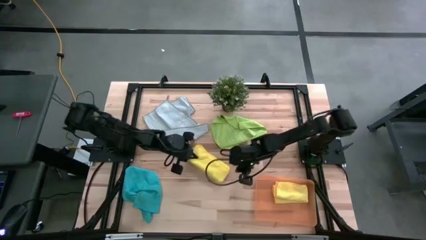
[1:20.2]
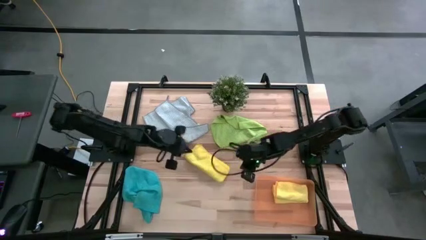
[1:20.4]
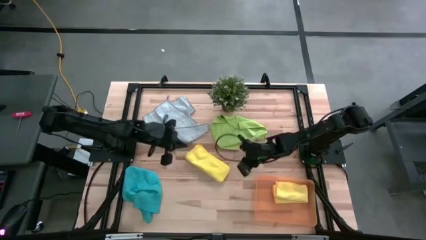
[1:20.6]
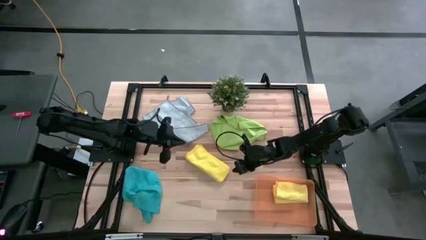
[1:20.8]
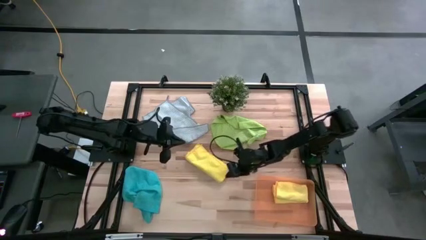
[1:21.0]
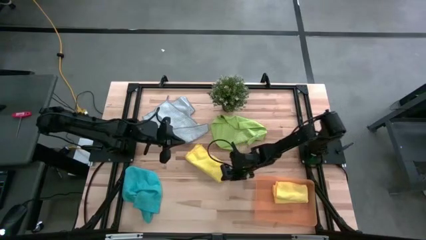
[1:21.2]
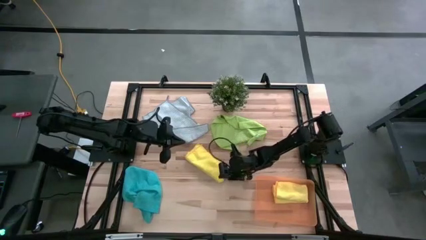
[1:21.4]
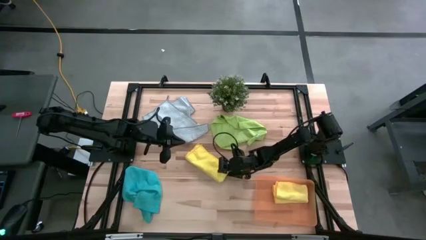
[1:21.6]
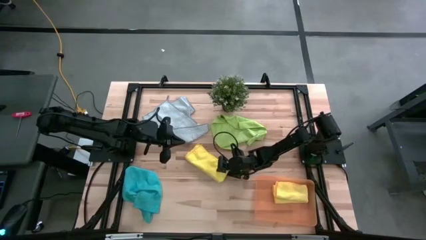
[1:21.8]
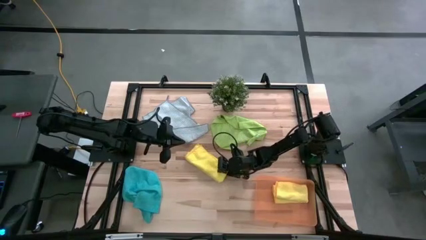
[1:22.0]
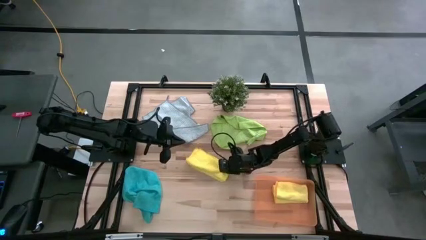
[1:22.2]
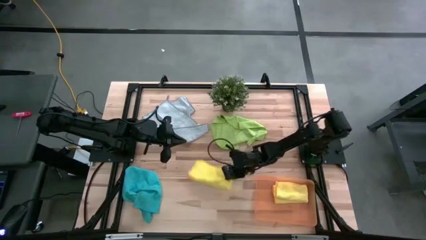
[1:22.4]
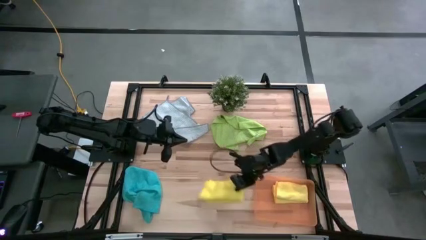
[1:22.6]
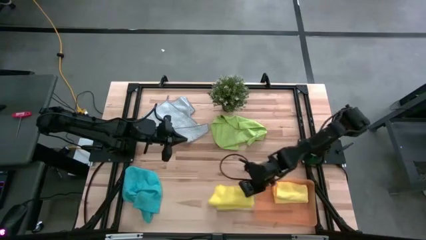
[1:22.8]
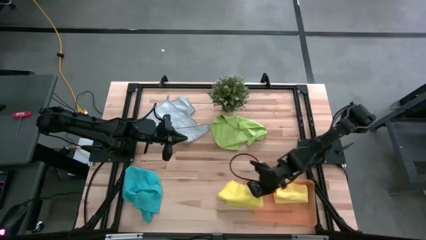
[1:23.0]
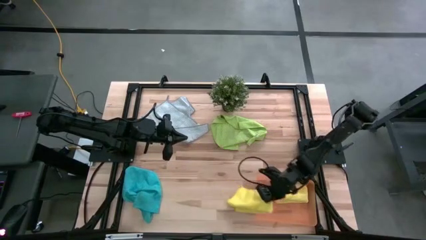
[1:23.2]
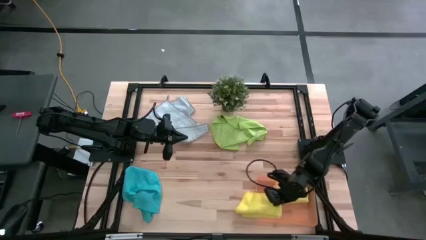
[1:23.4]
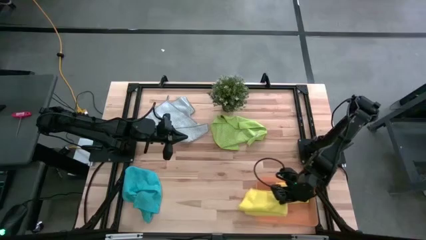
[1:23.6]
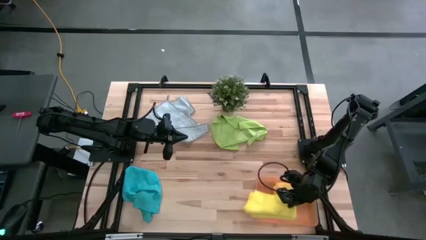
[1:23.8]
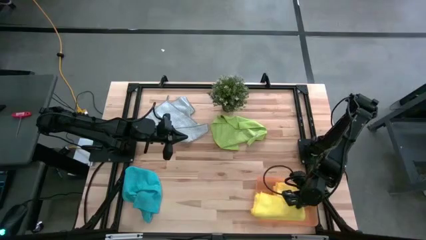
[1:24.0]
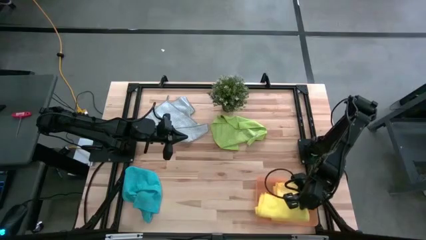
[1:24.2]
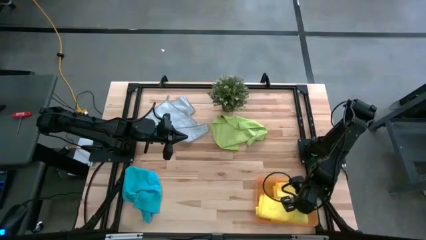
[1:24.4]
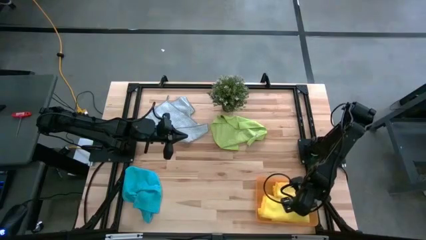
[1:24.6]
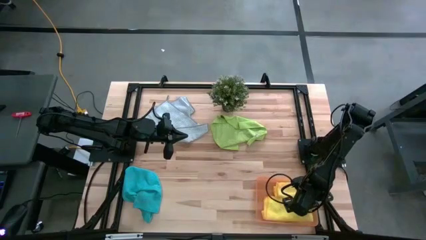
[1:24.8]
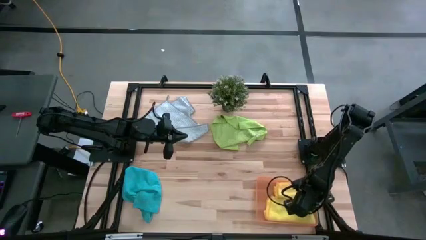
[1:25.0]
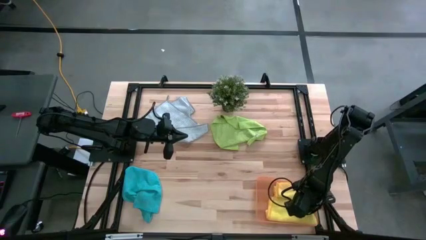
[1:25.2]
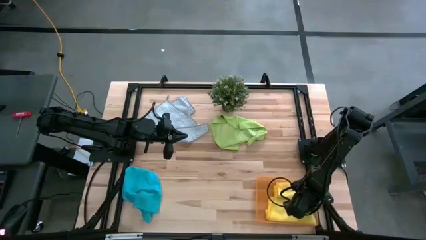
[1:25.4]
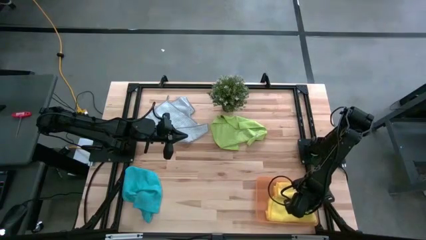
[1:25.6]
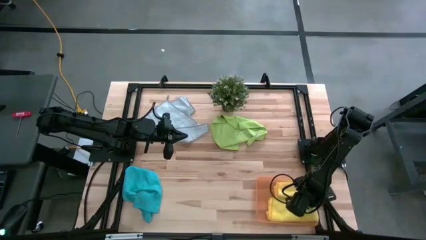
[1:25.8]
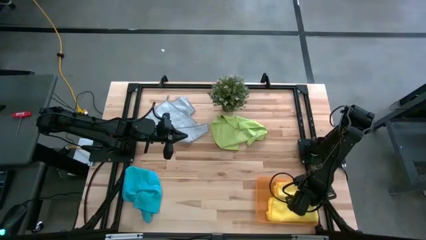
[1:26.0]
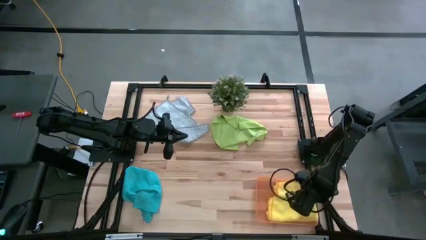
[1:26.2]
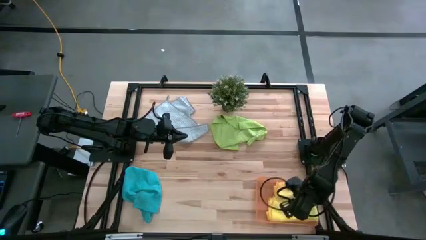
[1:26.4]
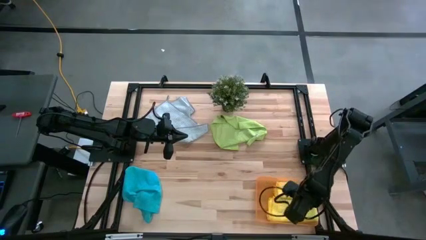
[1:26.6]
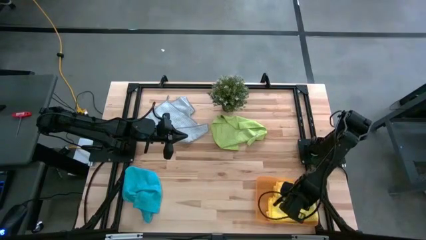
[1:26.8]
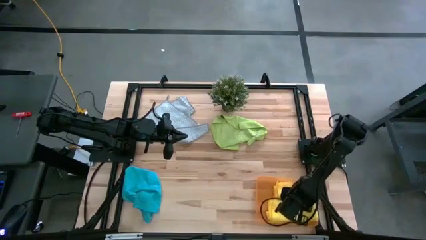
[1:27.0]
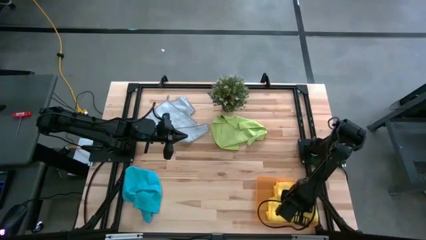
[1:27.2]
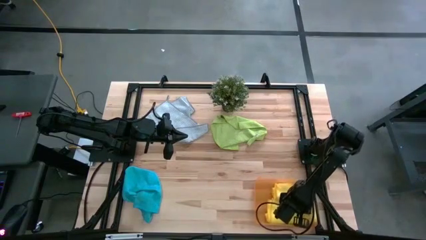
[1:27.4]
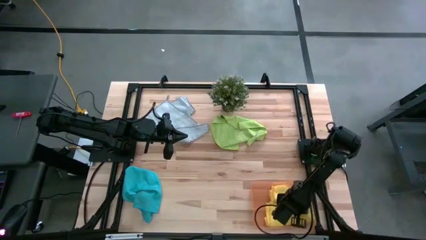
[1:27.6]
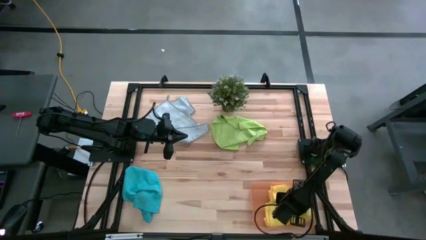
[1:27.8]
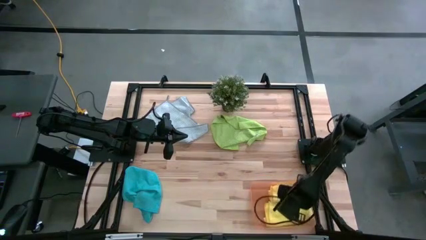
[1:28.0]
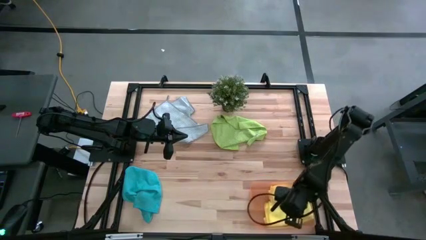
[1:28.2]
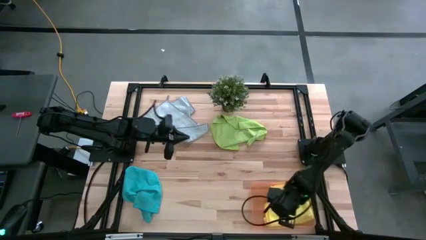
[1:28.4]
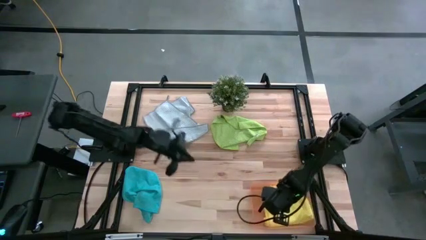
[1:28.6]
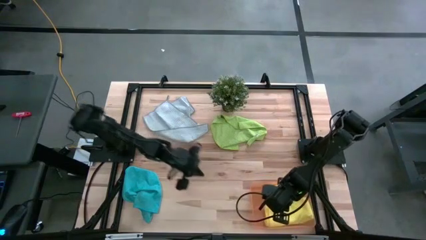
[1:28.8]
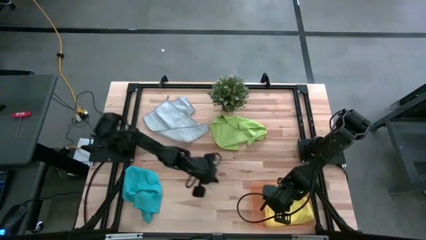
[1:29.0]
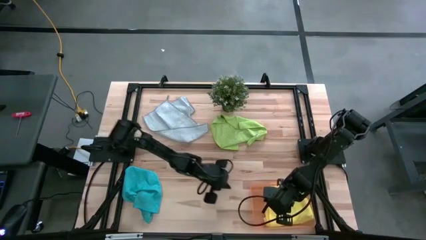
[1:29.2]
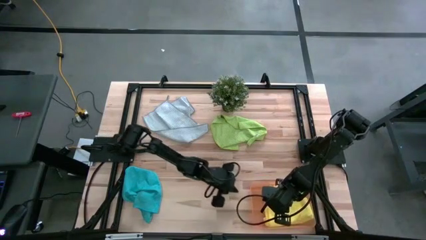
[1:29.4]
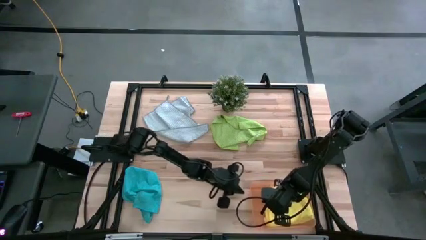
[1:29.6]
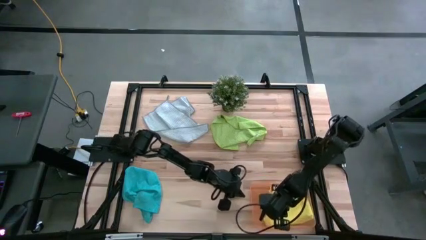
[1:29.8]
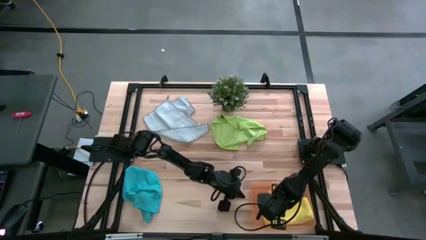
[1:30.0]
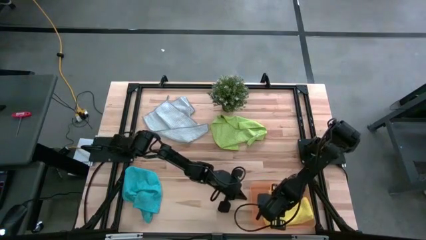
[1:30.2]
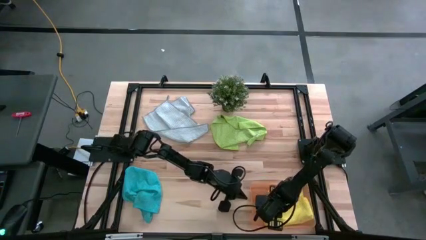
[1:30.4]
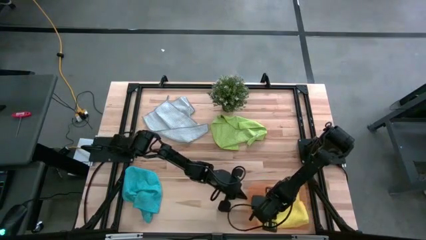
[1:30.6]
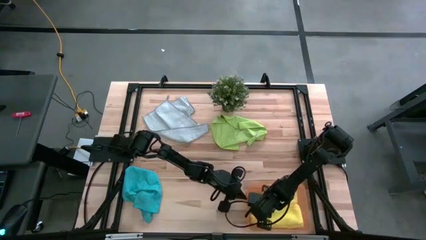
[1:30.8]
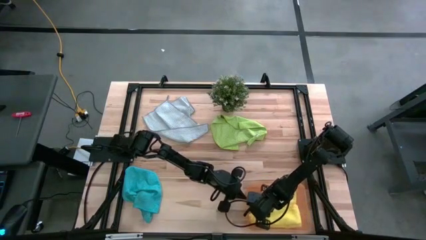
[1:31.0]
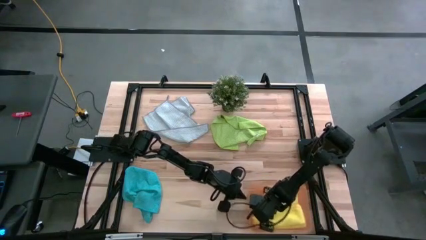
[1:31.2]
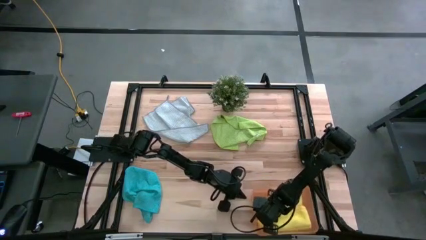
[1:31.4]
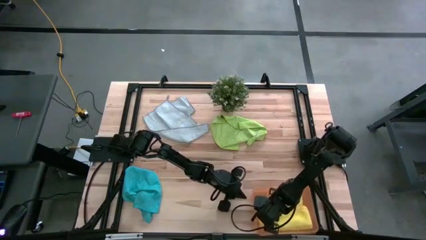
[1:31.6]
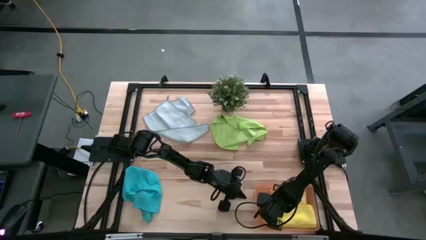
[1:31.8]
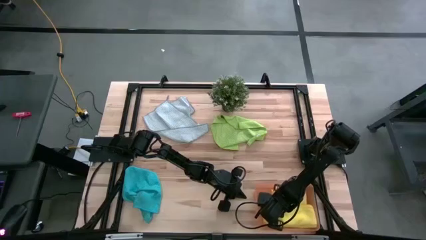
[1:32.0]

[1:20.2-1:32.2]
Task: Fold microfiber towels
Put the folded yellow microfiber towel into the orange bin

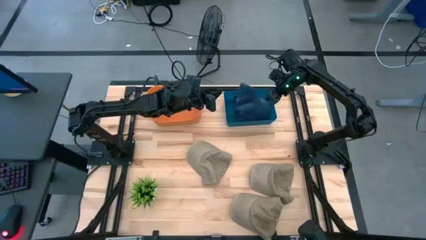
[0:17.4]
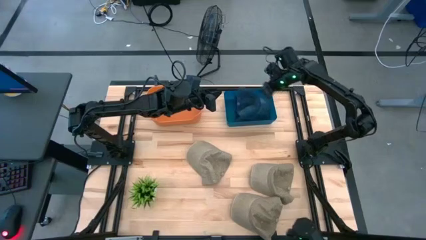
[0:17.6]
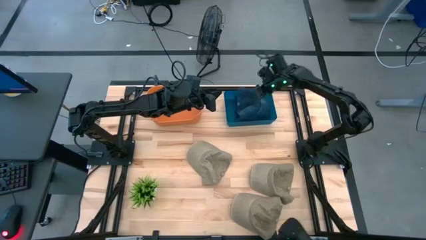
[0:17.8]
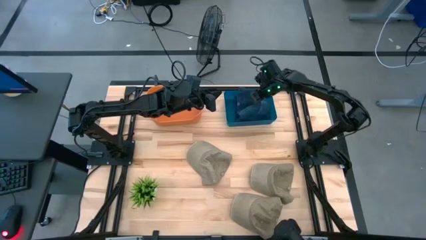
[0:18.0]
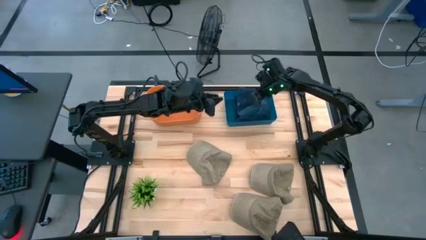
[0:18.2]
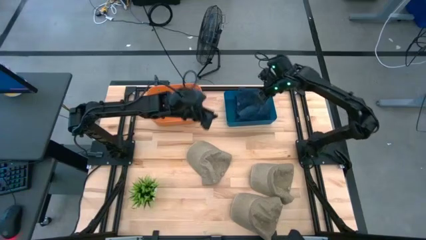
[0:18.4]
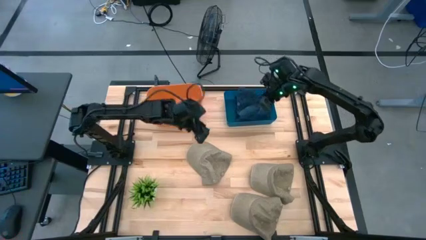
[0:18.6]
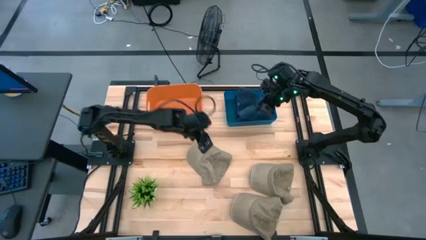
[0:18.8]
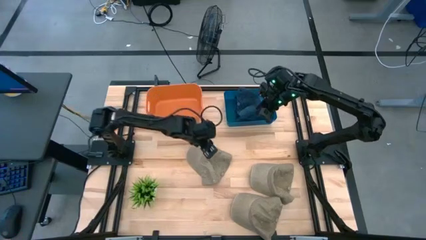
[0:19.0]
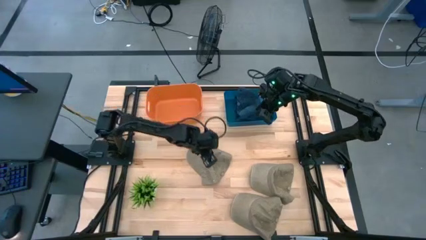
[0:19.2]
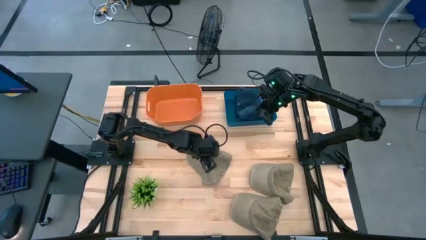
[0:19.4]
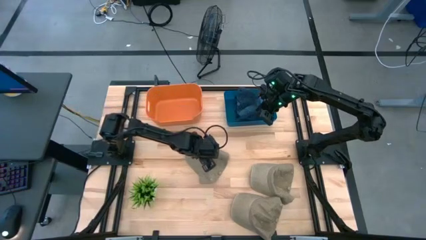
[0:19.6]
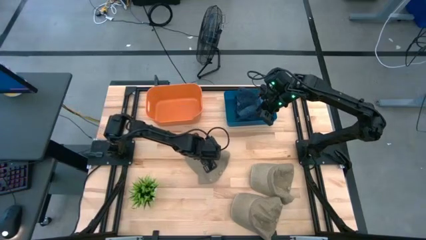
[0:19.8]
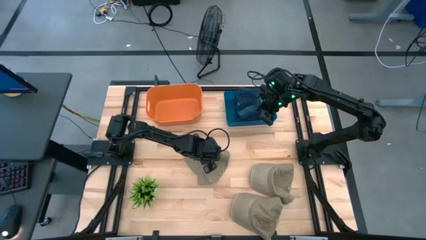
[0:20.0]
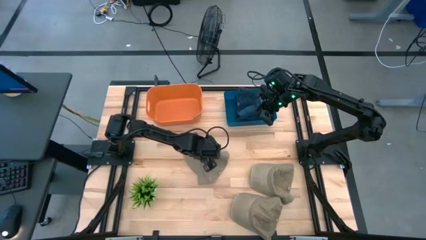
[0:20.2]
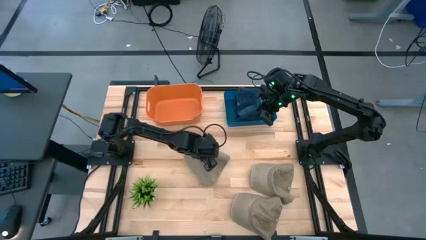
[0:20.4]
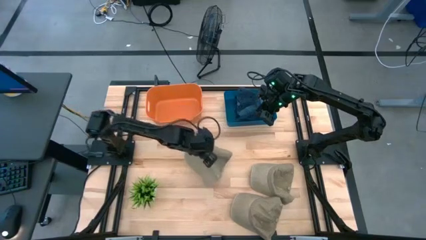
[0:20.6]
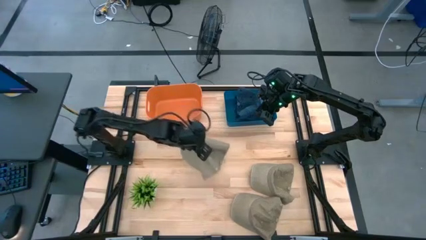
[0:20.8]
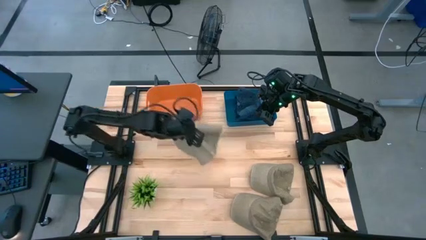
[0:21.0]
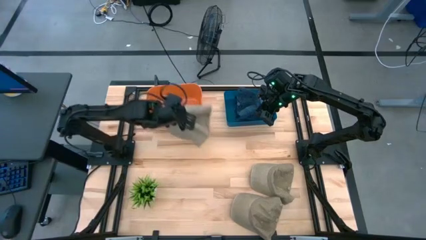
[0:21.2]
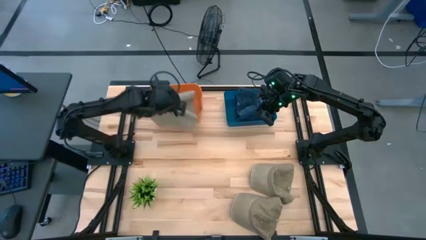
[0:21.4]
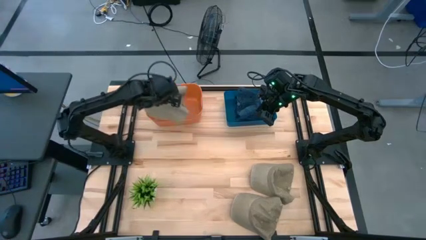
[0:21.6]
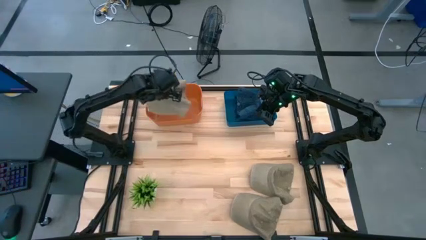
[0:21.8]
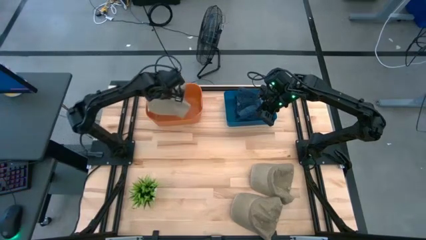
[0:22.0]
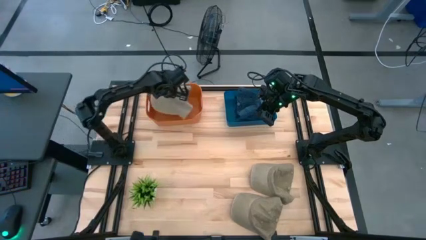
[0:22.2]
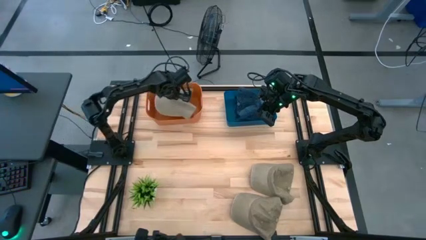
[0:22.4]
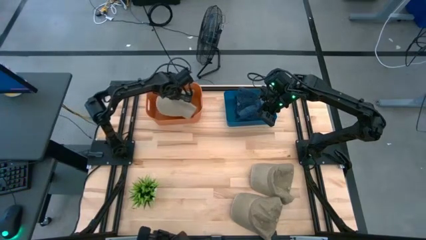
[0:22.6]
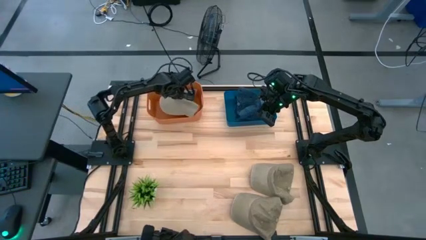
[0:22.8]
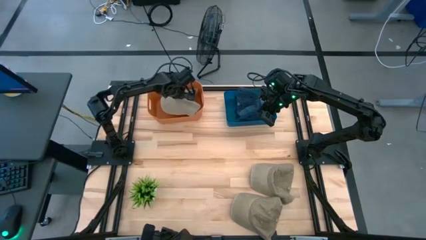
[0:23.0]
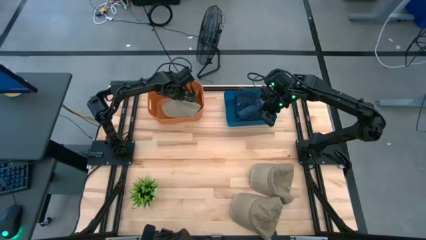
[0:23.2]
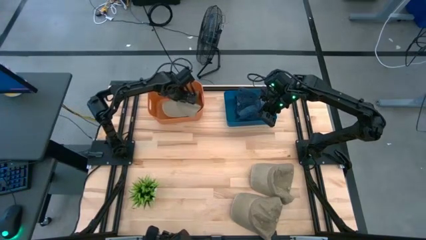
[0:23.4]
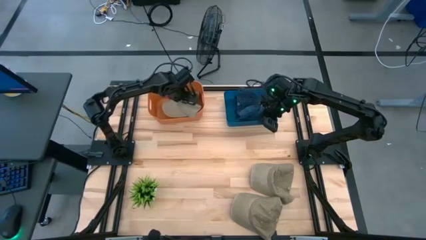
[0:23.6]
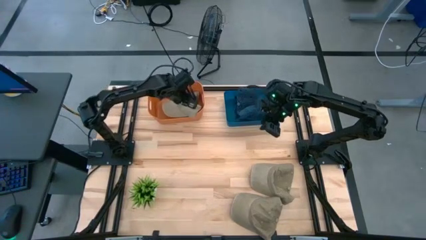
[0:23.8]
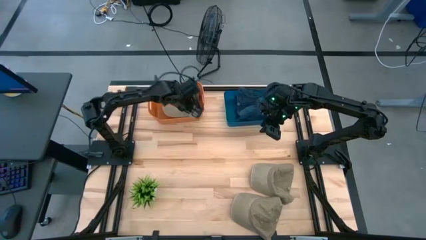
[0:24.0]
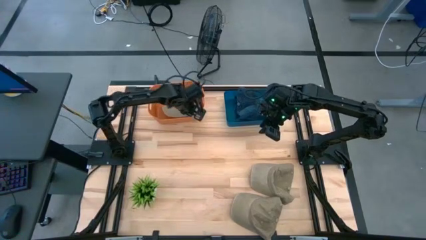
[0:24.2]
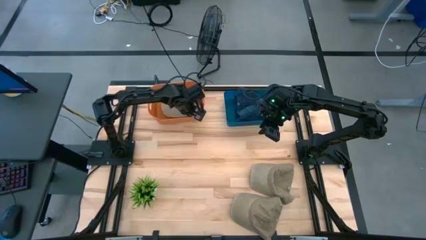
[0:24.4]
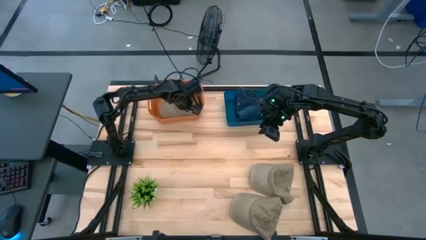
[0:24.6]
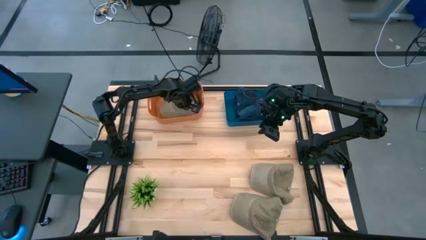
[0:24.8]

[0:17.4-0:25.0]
Task: Pick & Place hat
Put the top left brown cap into the orange bin
